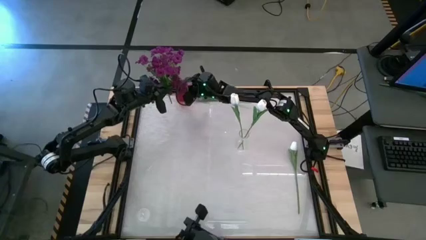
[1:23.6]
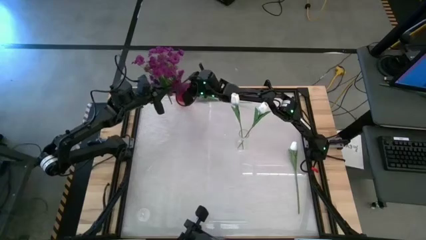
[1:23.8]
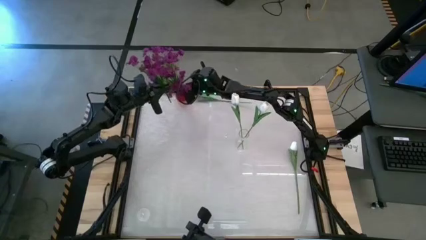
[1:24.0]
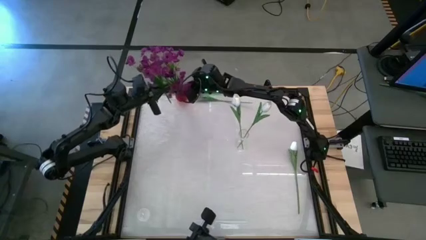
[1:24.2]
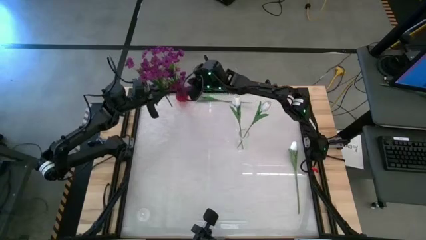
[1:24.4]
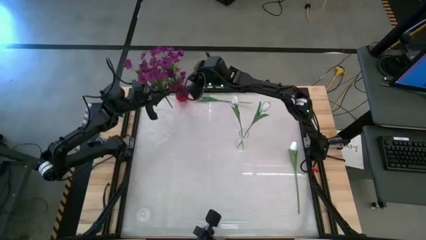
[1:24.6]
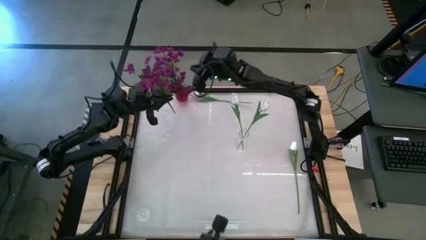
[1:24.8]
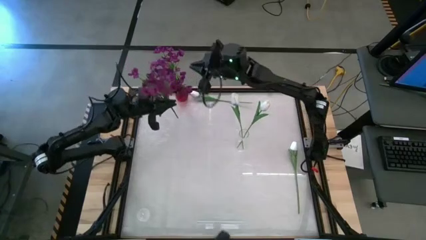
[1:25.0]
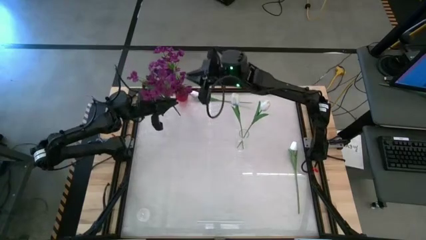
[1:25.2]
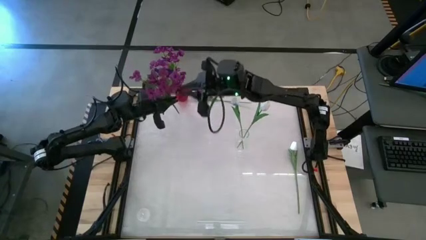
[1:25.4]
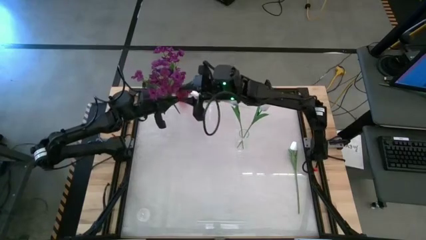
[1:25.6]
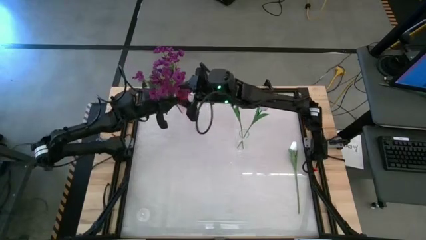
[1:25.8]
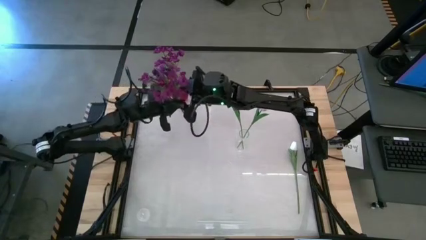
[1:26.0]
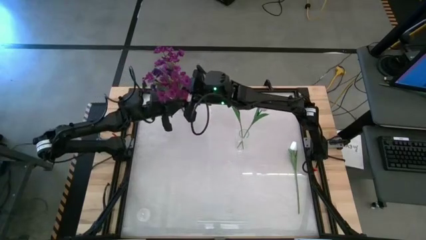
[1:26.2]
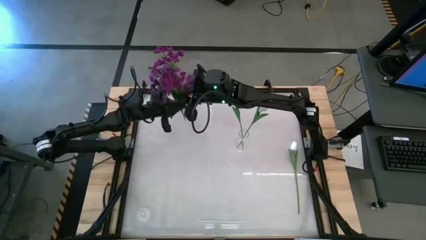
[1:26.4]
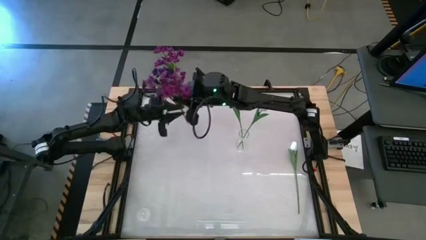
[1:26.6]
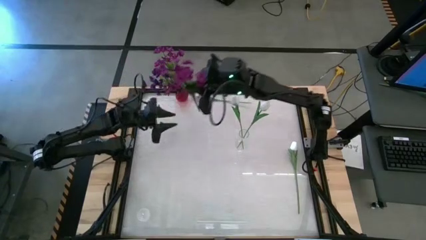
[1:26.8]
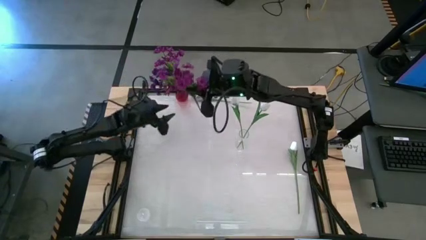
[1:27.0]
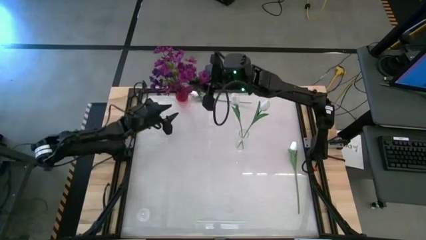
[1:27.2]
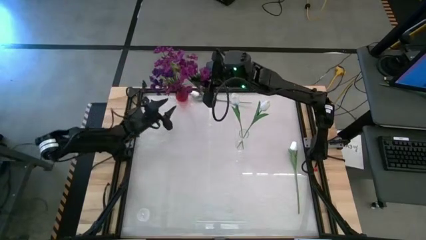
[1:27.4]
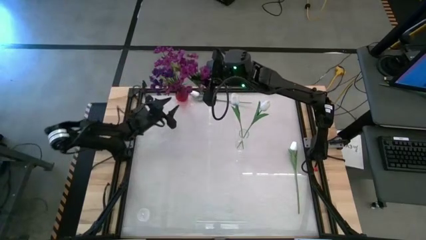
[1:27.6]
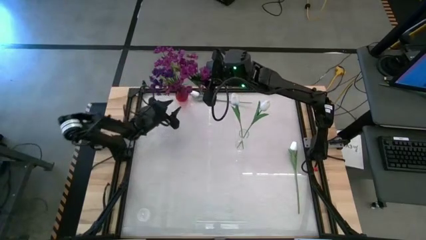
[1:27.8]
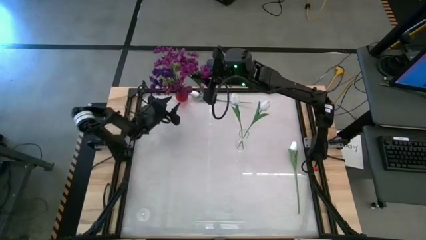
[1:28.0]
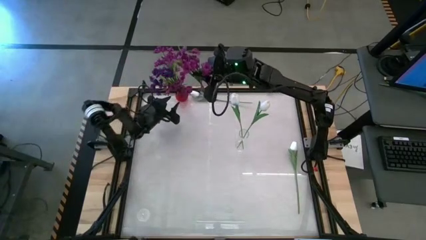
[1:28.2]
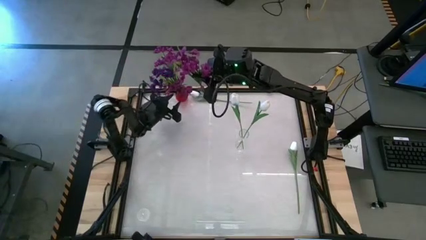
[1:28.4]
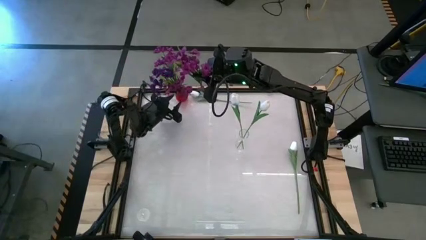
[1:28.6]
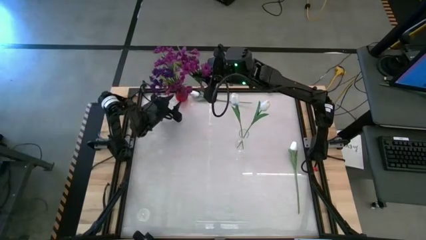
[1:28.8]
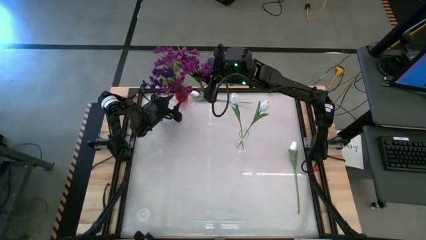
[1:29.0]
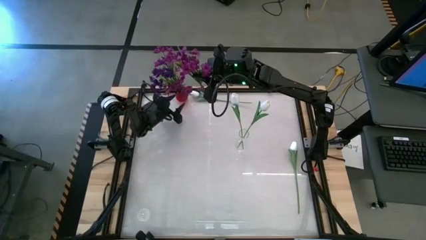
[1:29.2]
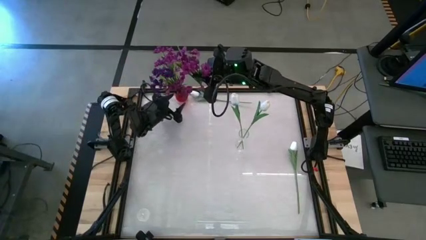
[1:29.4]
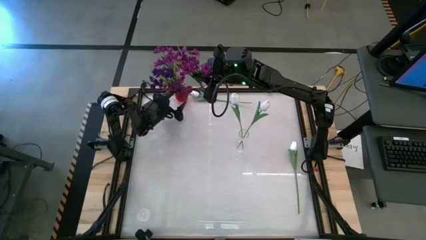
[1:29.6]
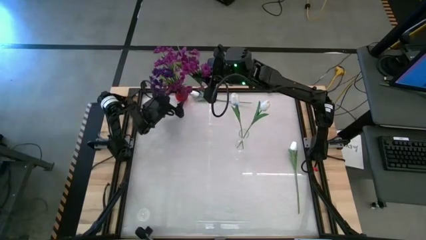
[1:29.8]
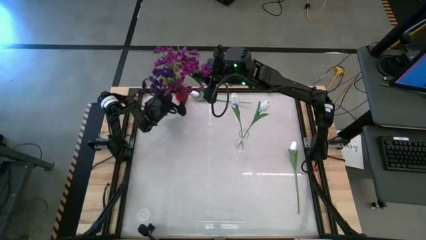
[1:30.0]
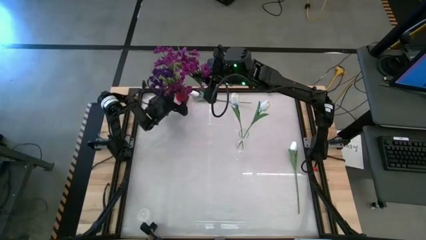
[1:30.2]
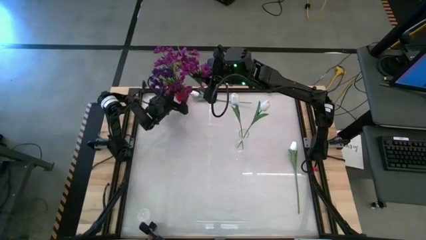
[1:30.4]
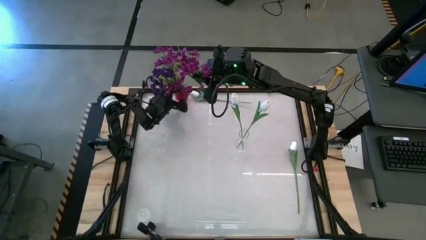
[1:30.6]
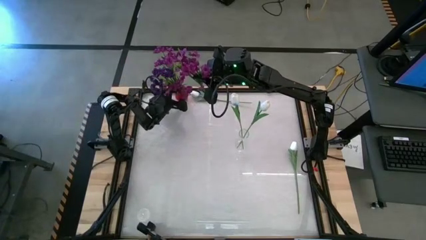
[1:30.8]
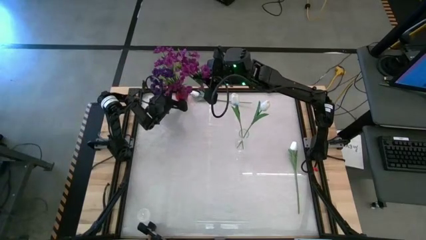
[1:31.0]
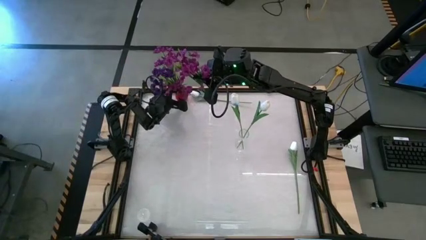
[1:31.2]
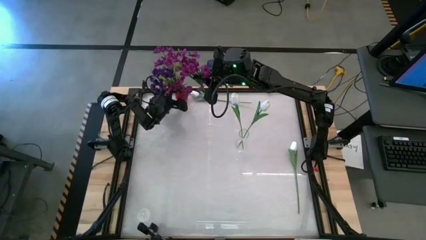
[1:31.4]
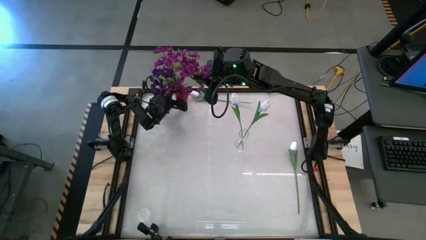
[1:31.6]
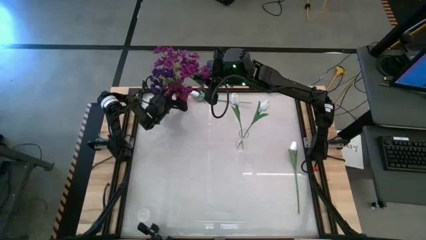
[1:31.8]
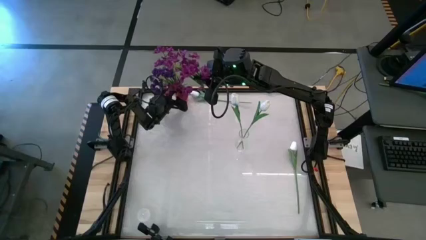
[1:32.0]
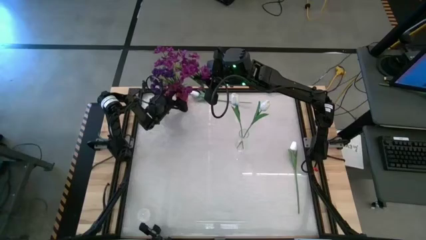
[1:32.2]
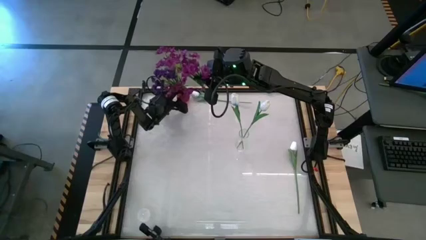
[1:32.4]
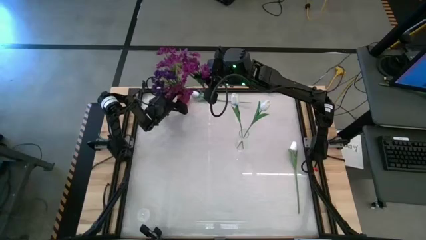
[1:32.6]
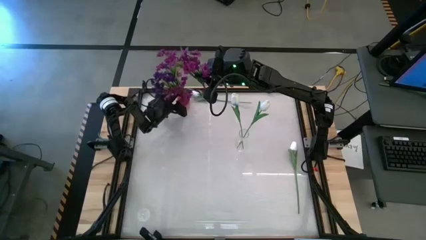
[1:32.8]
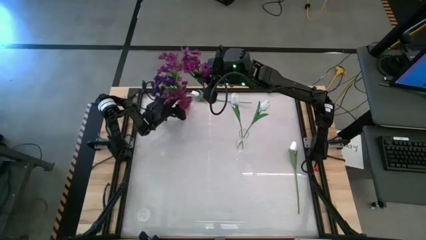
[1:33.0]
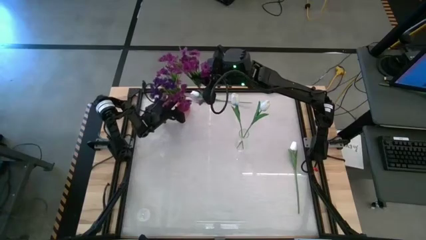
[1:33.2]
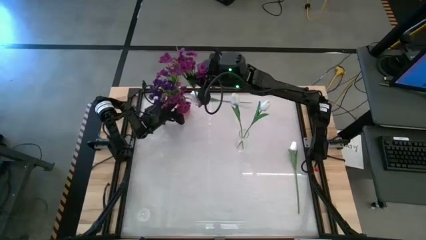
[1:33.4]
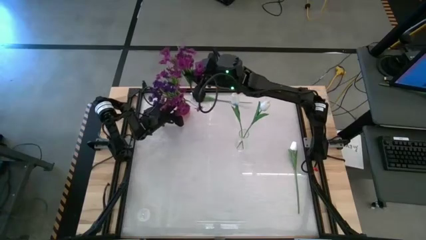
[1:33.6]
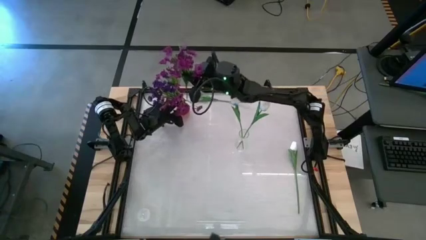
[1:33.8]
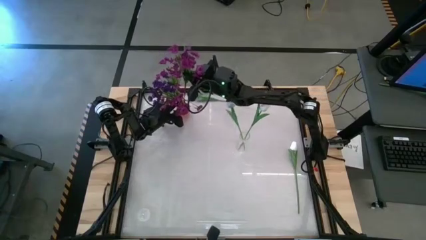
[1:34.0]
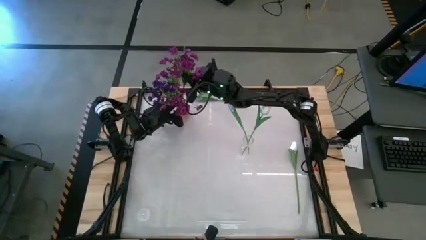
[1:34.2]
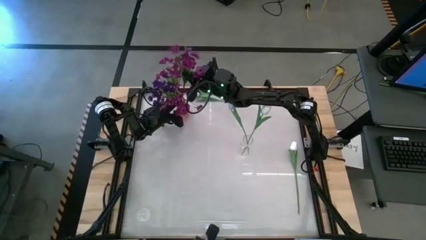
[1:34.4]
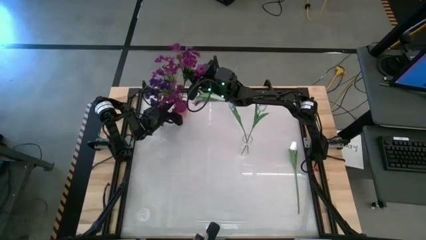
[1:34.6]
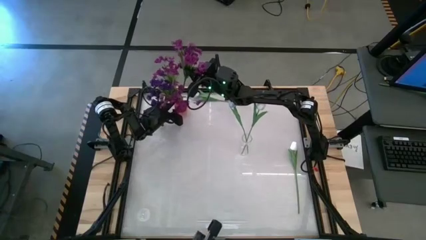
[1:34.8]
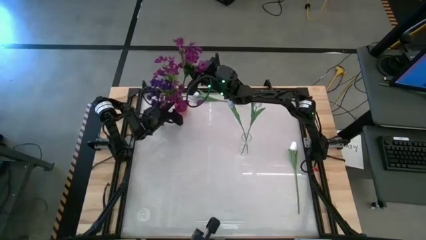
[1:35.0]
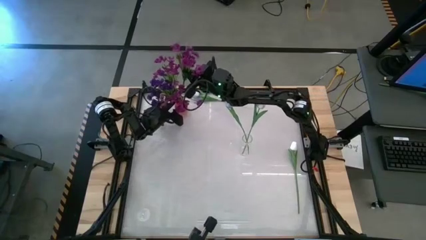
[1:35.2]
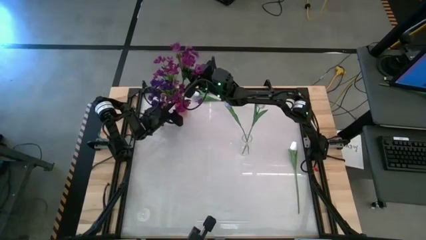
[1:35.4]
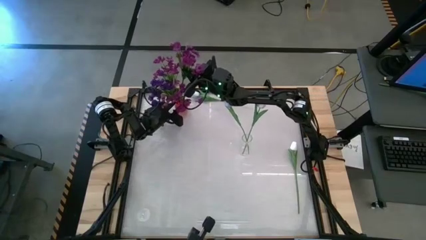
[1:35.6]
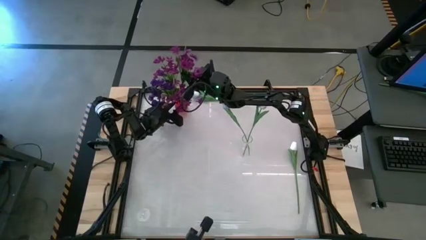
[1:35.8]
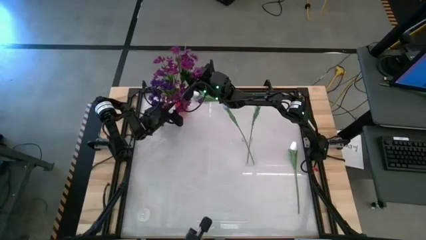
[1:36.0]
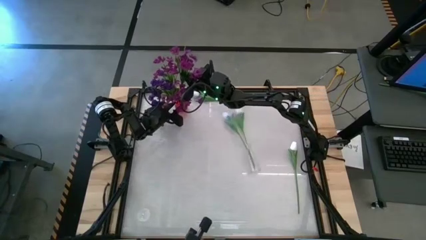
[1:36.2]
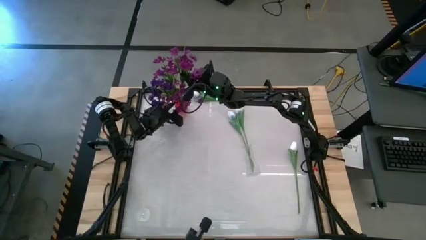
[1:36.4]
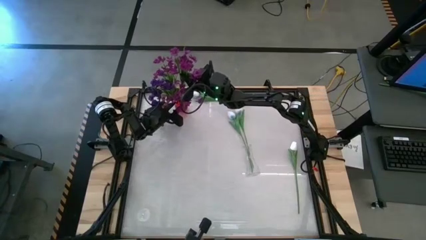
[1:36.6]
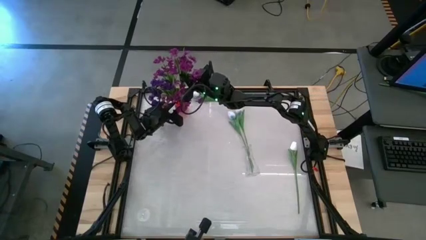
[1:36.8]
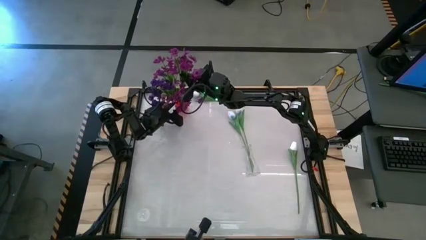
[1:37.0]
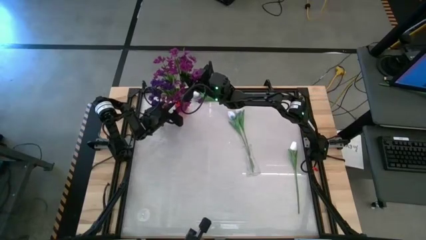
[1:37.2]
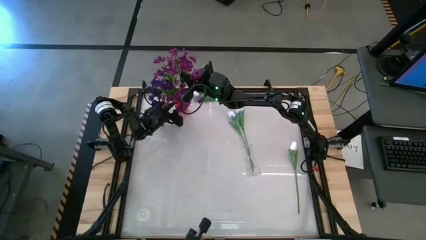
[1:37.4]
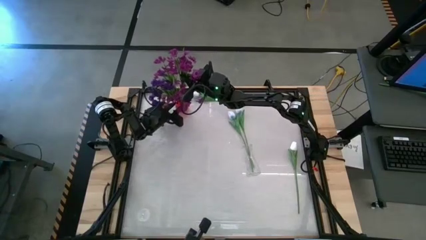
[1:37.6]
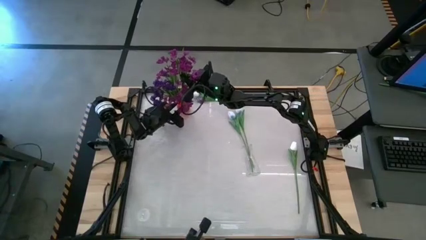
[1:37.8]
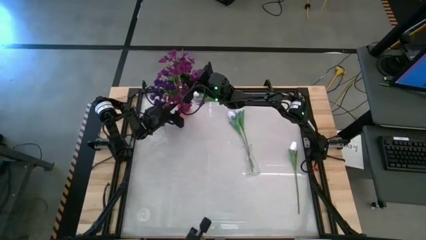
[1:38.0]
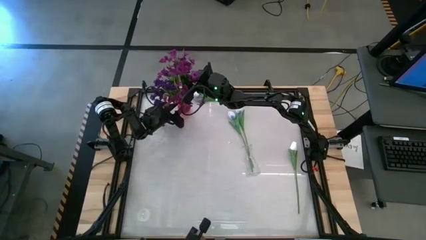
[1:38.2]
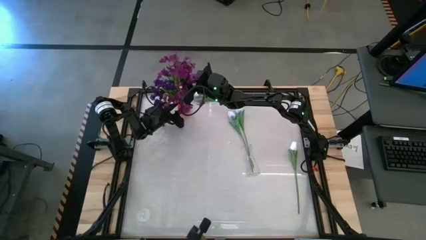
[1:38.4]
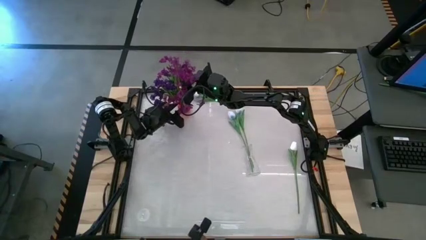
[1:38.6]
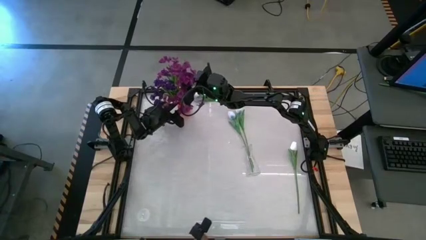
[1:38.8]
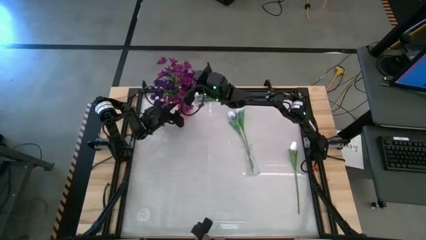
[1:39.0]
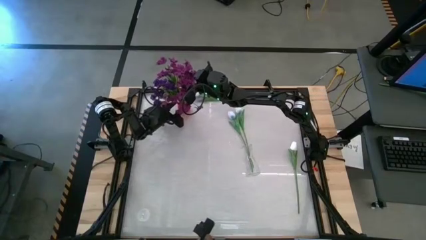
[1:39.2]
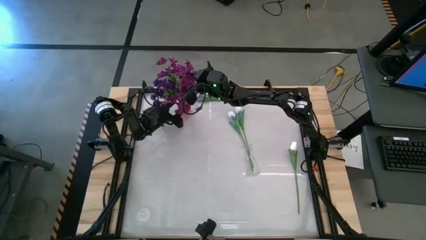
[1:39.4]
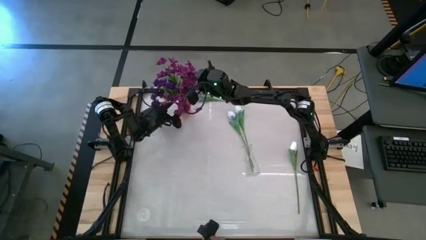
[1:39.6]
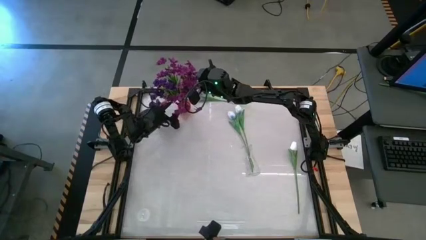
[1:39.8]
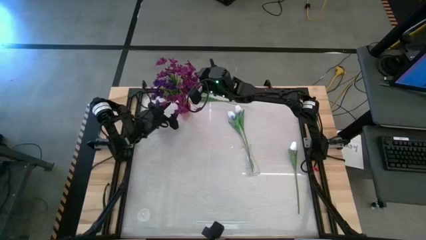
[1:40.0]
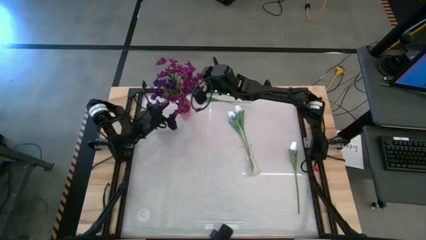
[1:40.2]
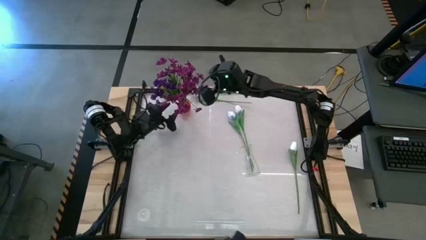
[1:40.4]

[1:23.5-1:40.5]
Task: Sort flowers into vase by color
Put the light purple flower into the red vase
